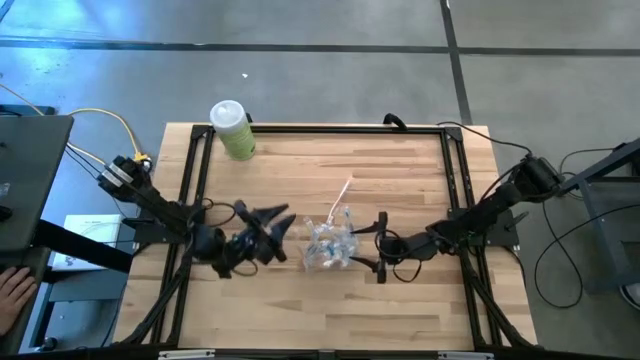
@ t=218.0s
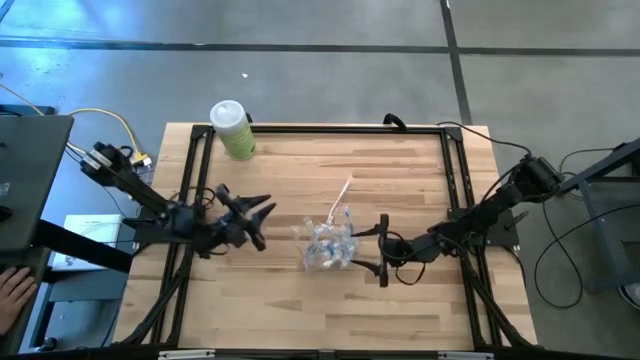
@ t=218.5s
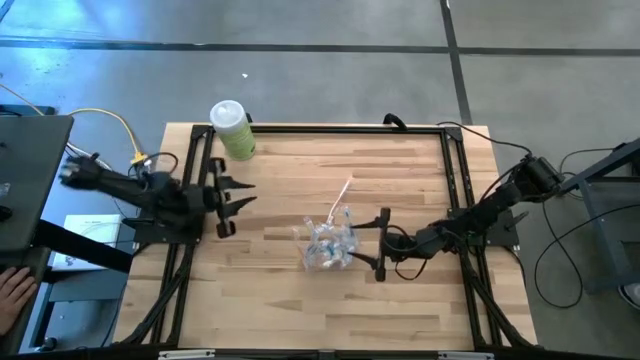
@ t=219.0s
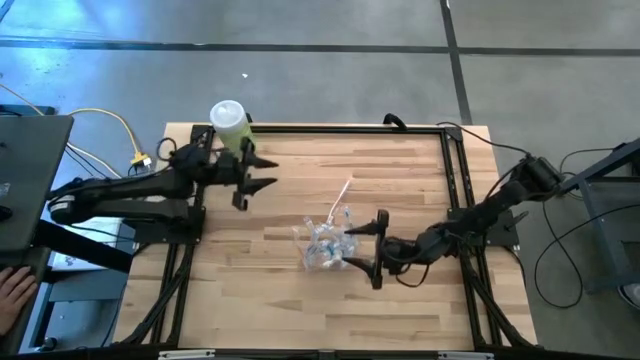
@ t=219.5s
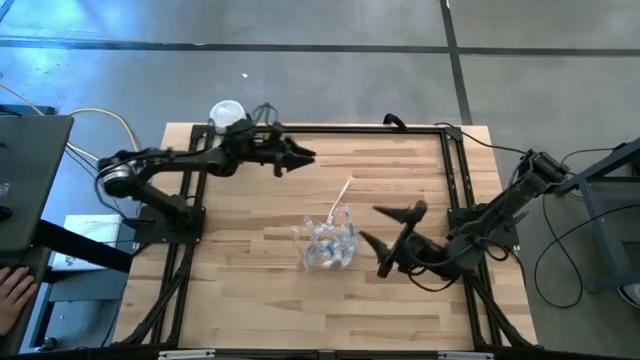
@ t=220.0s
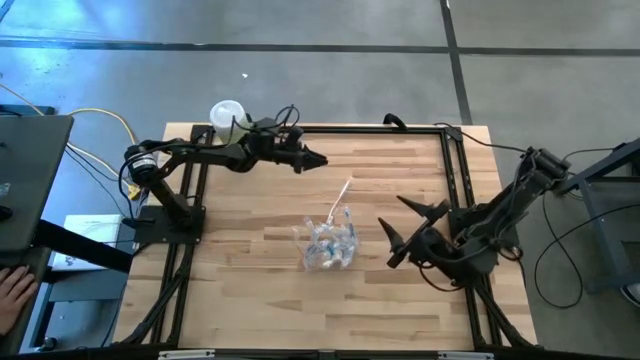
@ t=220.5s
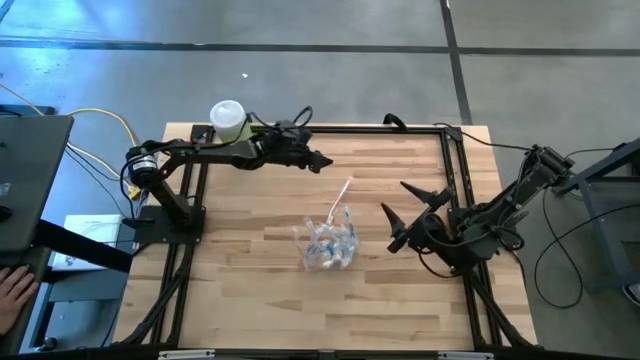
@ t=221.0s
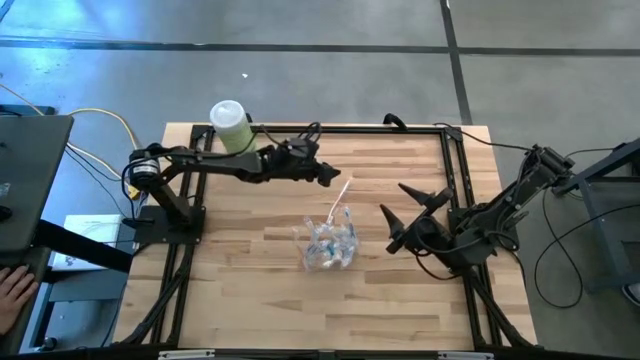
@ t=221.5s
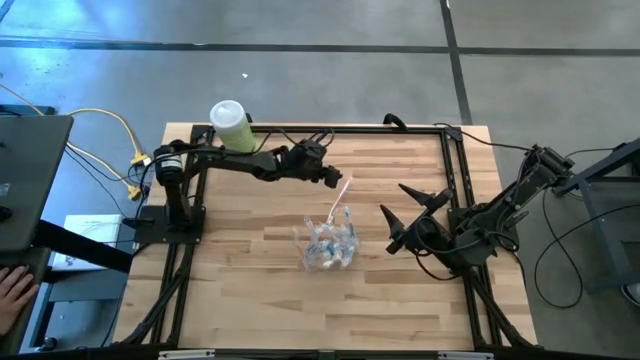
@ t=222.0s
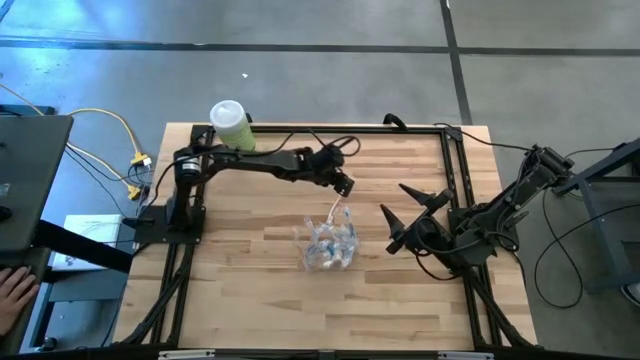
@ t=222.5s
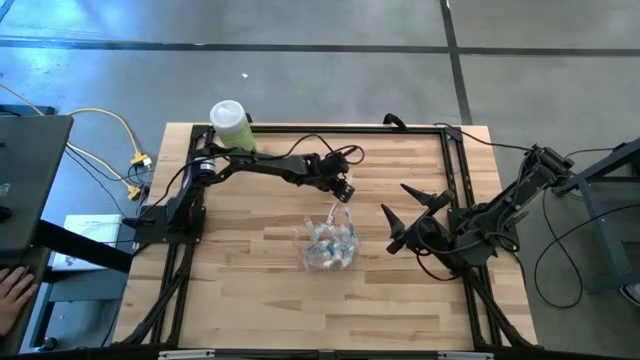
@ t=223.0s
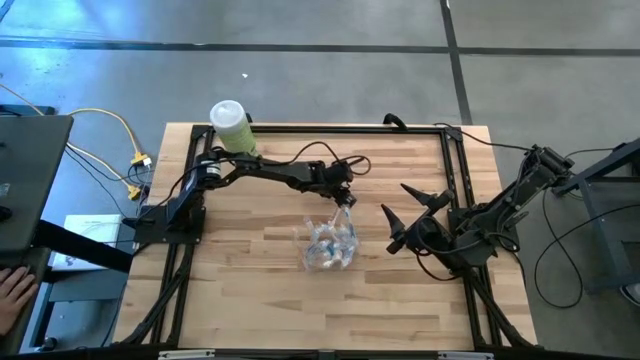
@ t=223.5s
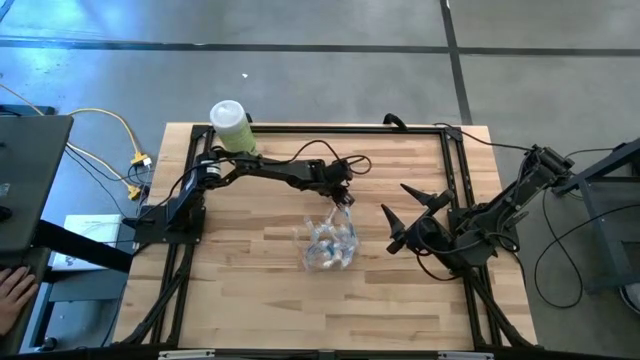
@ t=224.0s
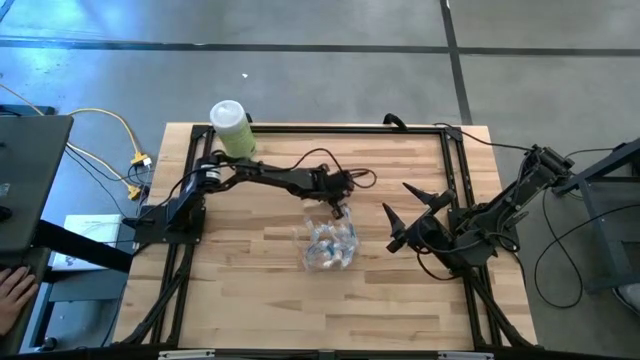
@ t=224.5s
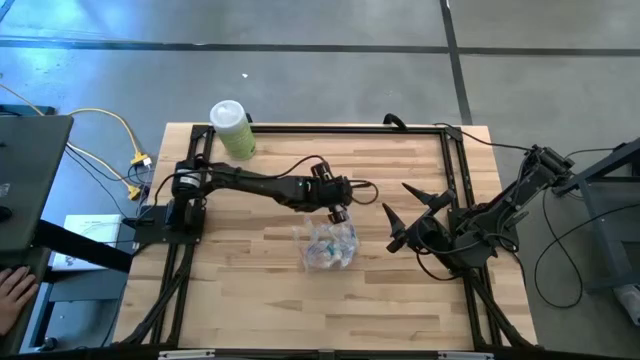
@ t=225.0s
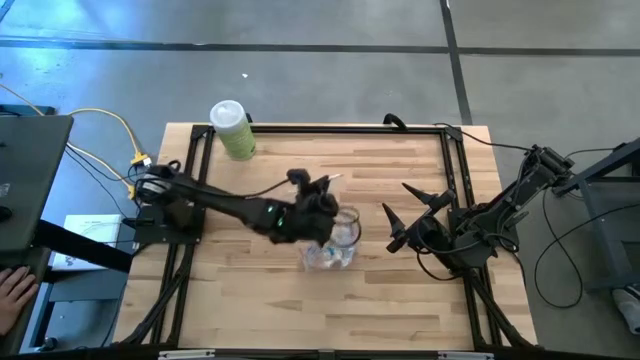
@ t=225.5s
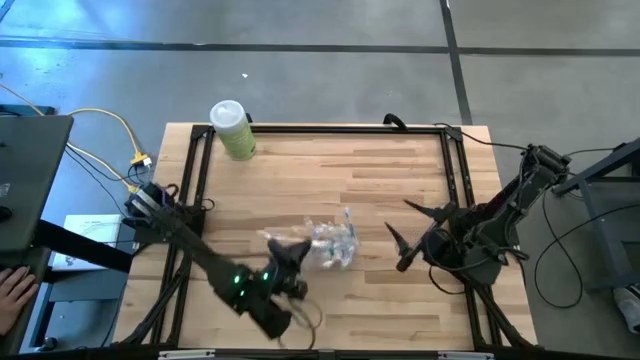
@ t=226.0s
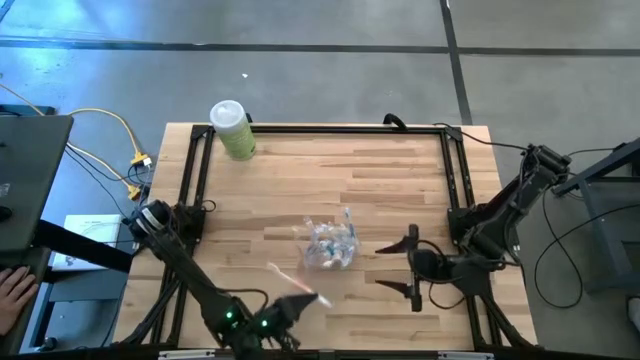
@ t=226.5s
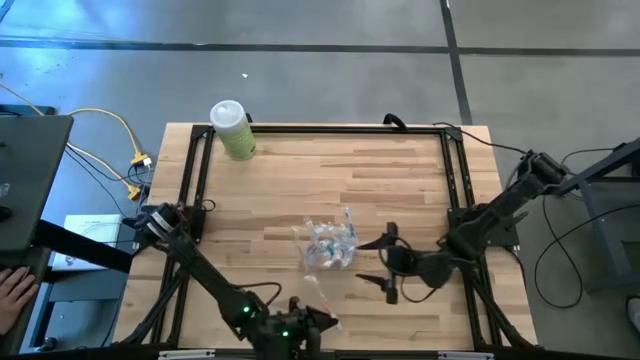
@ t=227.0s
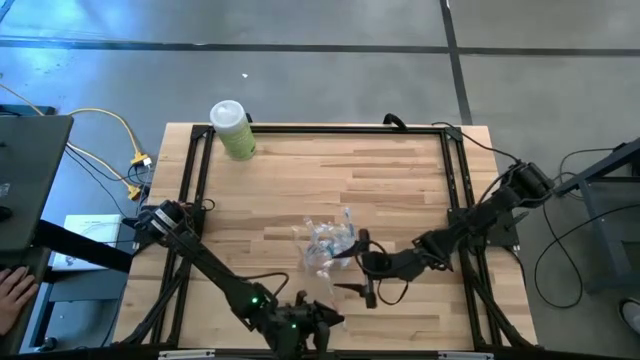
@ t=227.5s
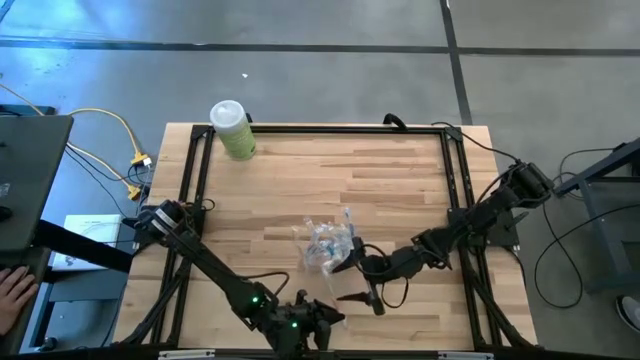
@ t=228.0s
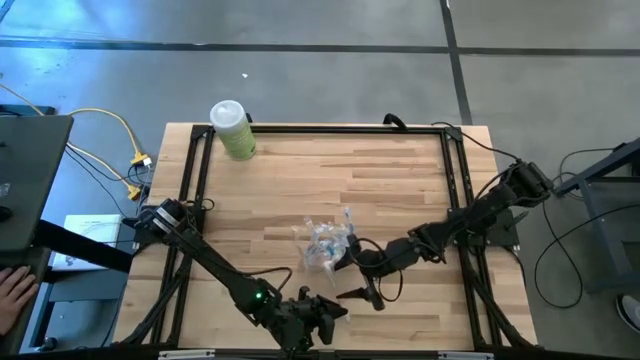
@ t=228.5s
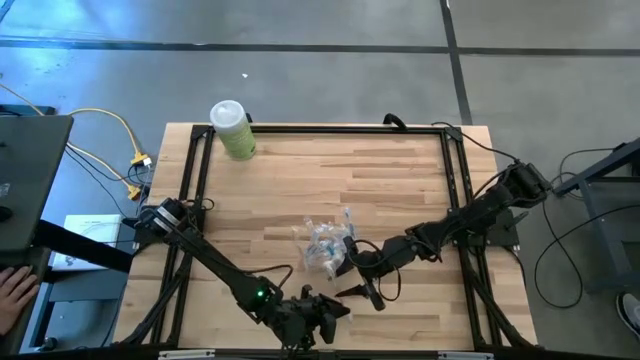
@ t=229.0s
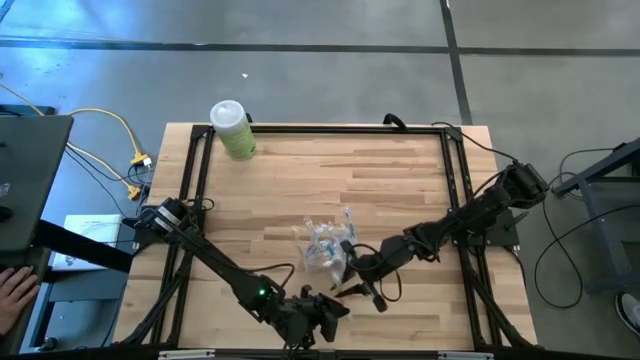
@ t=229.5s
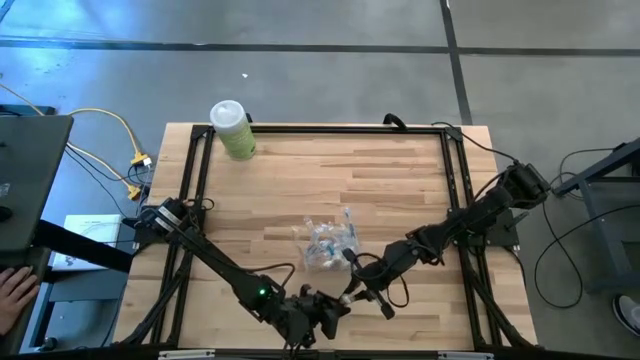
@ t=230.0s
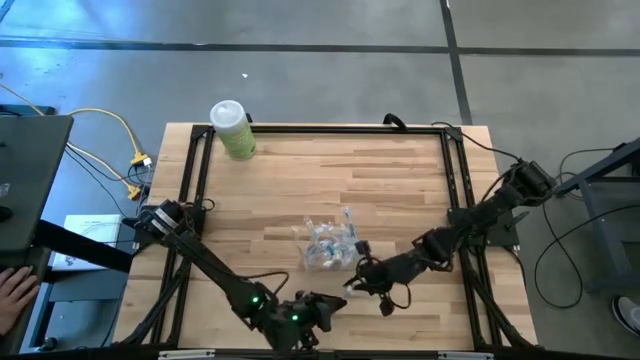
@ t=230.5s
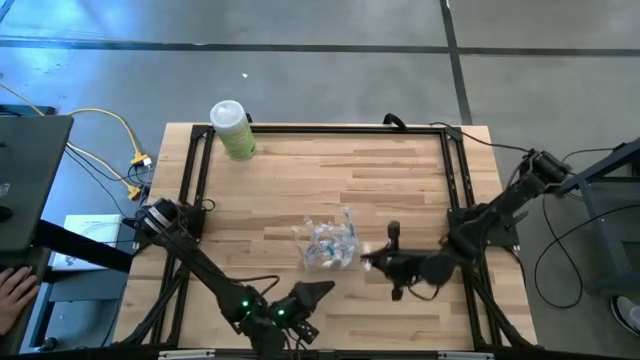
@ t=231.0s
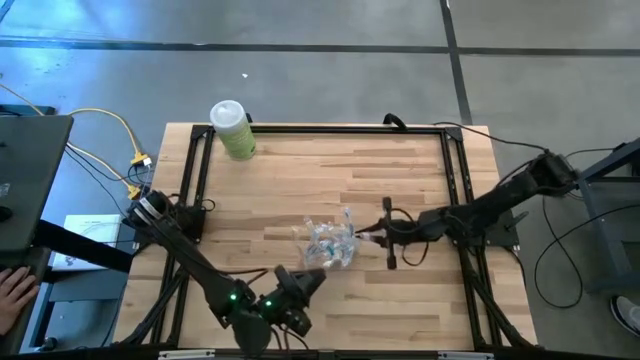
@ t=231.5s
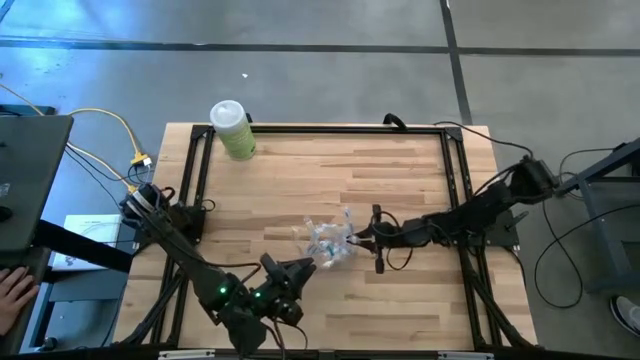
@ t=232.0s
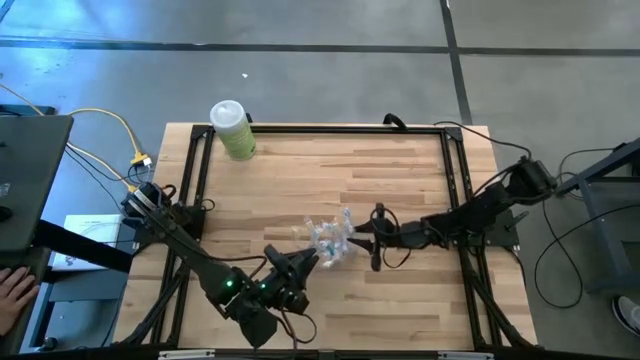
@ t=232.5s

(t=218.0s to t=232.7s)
Task: Pick & Place toothbrushing station
Put the orange toothbrush into the transparent organizer

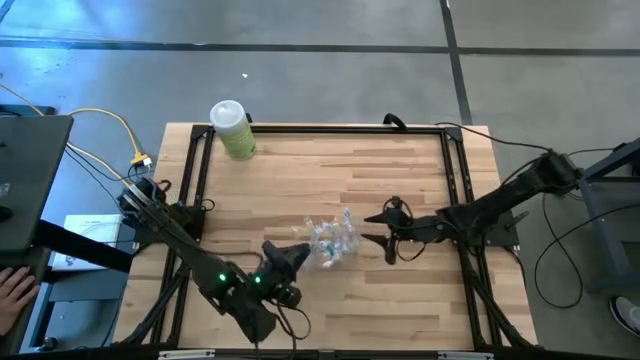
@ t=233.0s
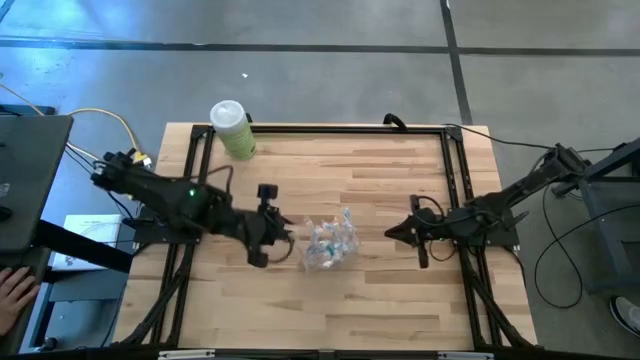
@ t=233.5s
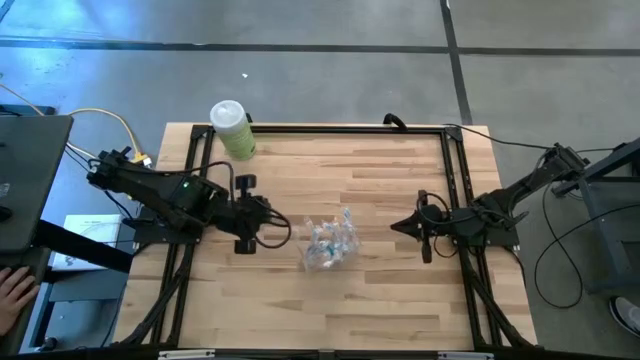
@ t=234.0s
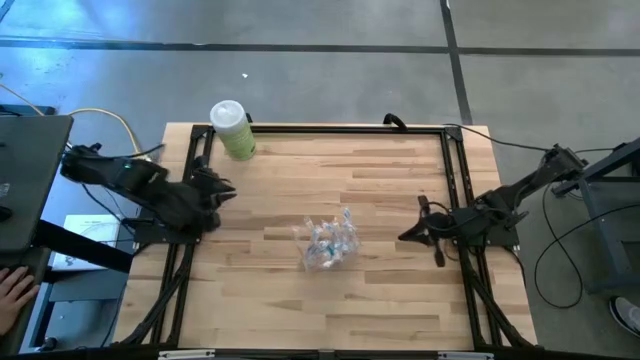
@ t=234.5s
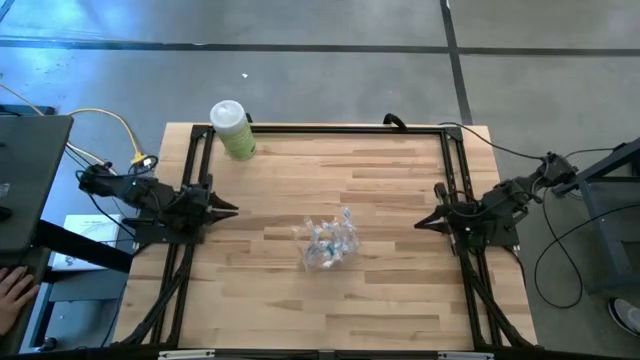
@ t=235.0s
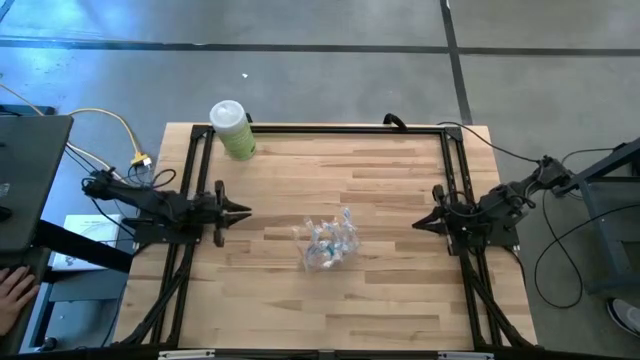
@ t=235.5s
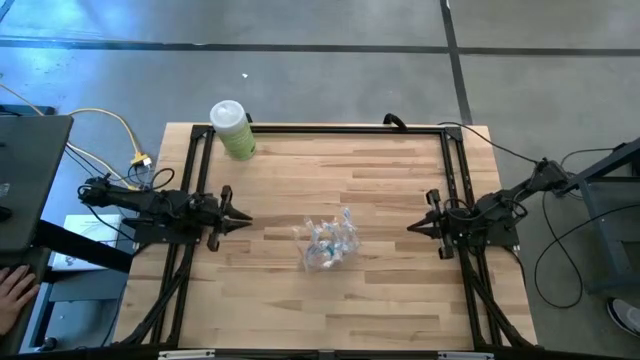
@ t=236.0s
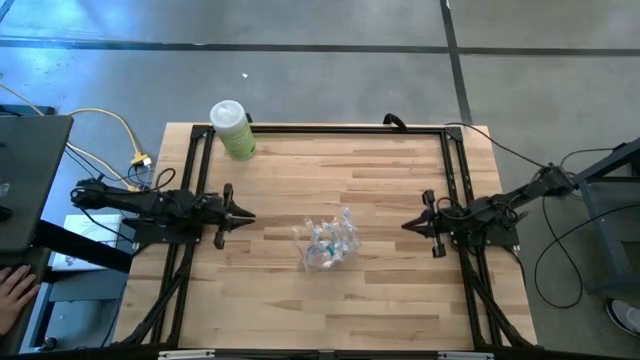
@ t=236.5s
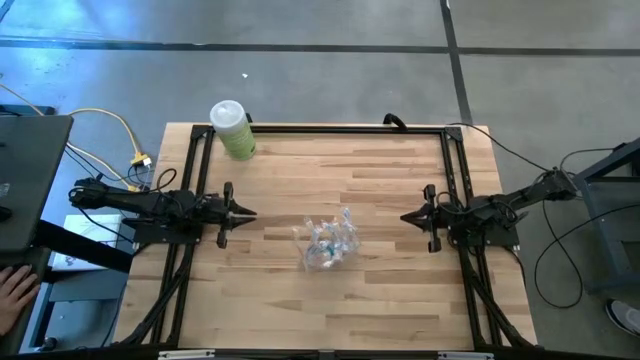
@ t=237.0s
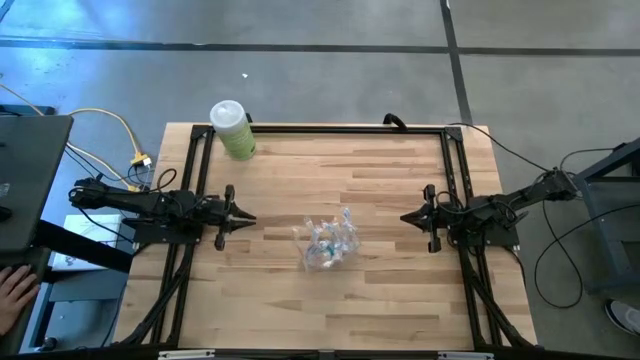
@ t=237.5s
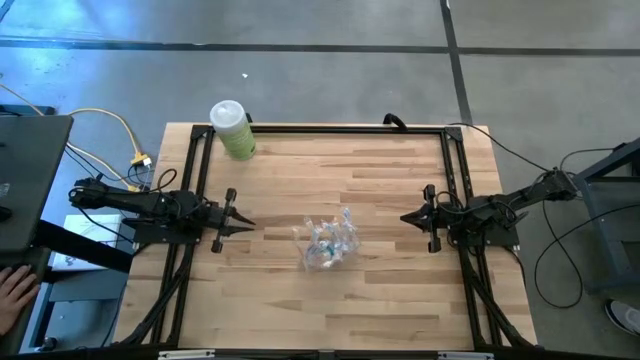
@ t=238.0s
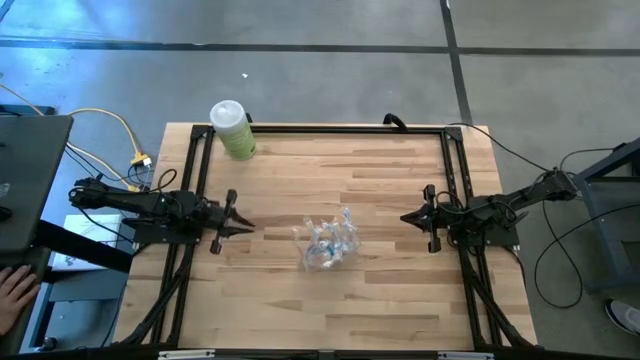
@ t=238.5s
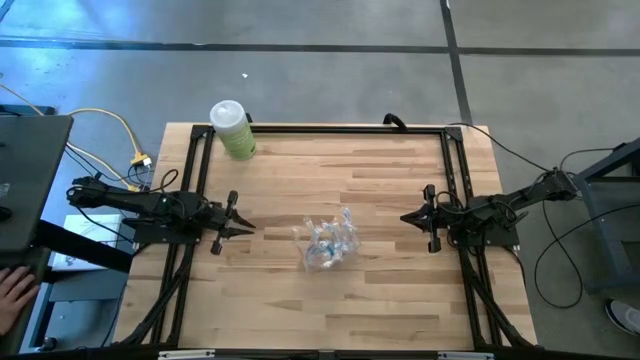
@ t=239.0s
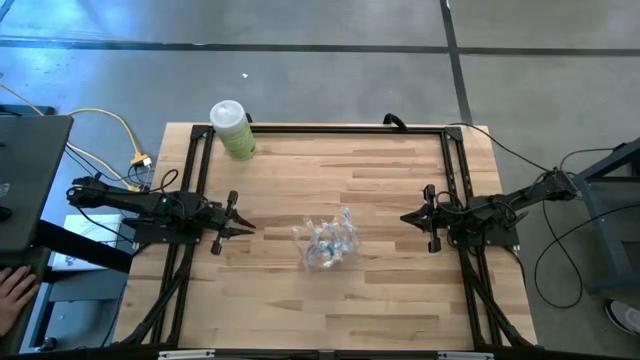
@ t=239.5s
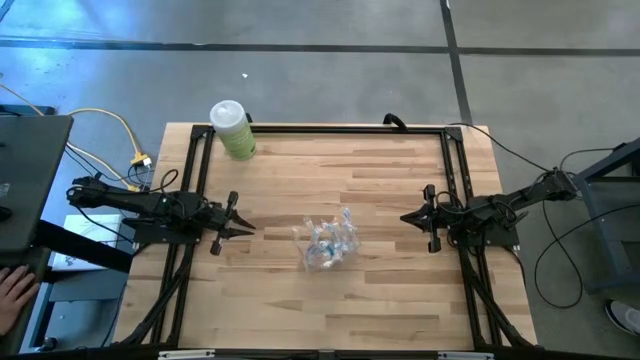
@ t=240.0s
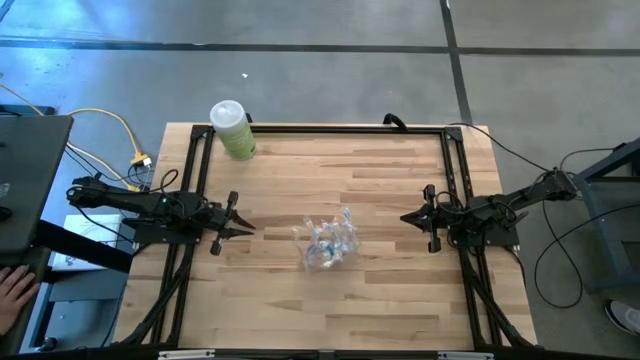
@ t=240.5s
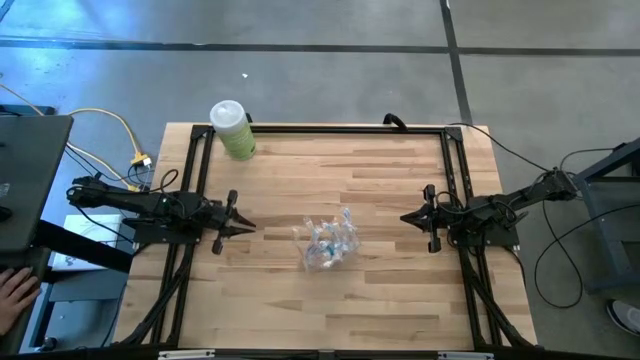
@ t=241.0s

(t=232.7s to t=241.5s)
Return to Home Position
